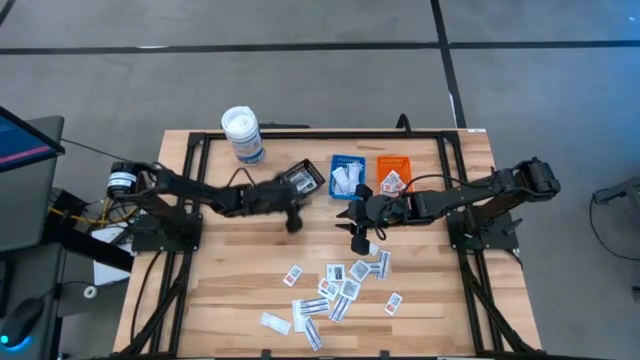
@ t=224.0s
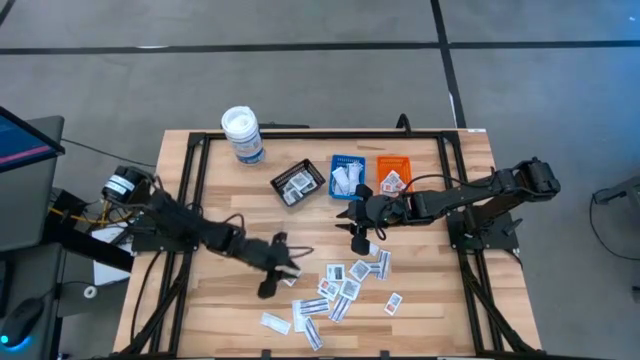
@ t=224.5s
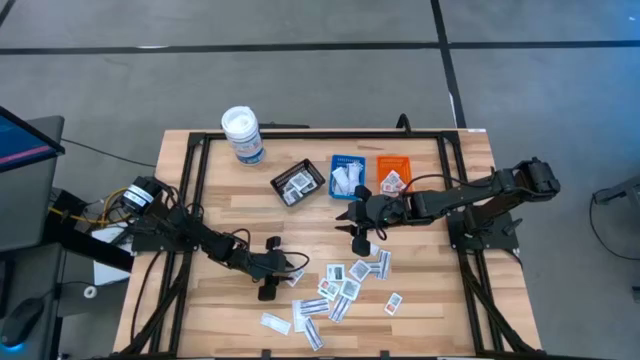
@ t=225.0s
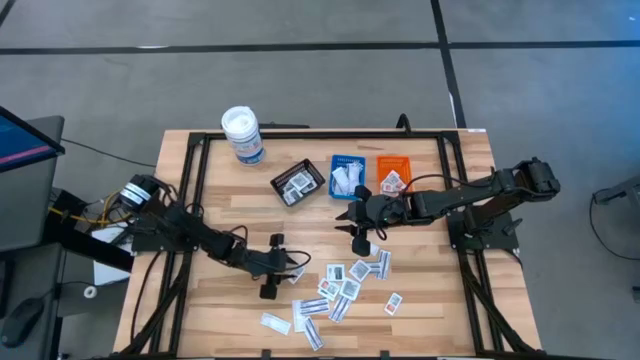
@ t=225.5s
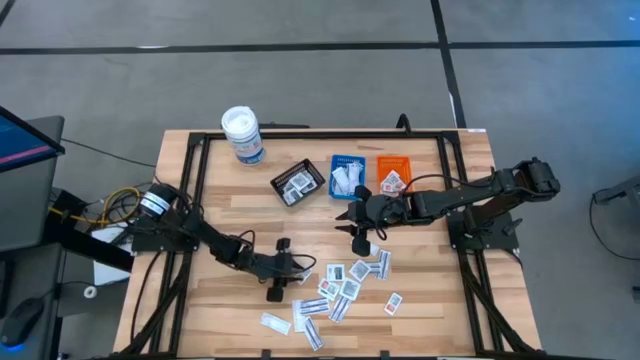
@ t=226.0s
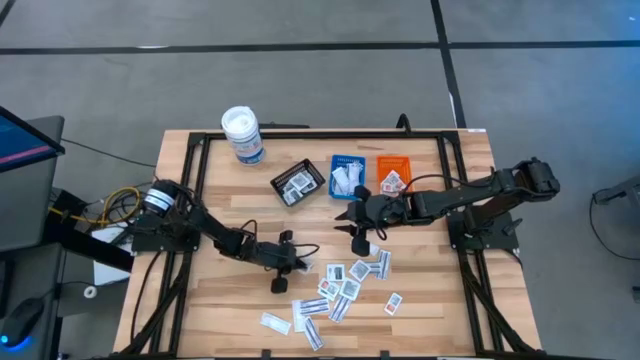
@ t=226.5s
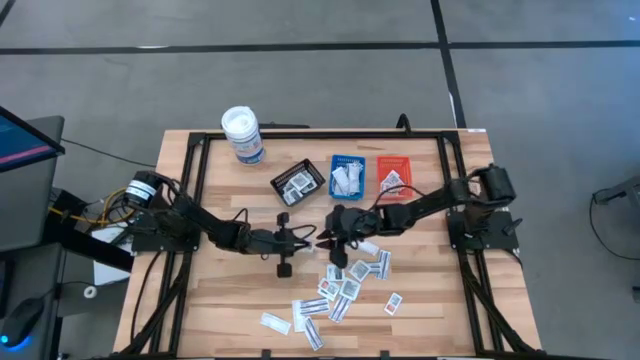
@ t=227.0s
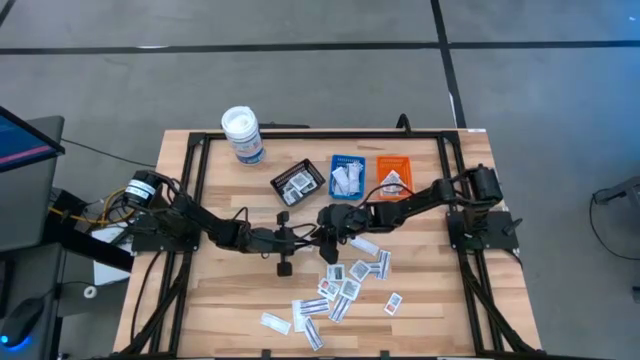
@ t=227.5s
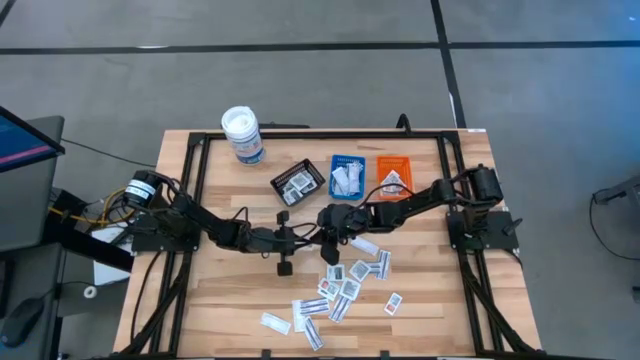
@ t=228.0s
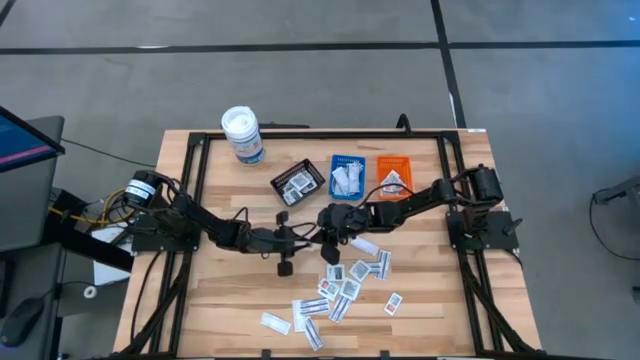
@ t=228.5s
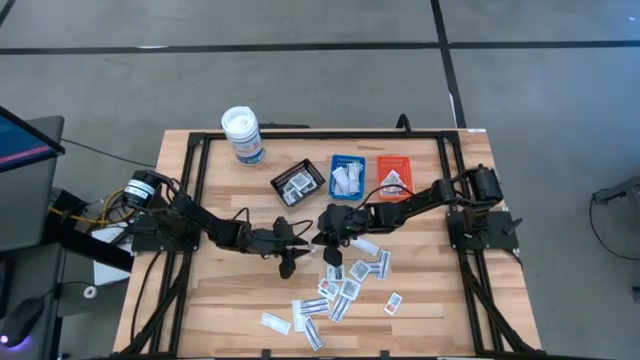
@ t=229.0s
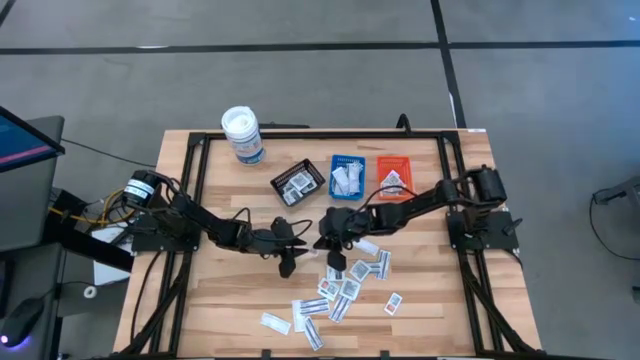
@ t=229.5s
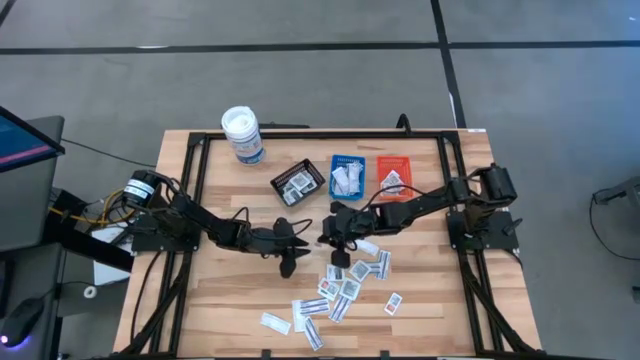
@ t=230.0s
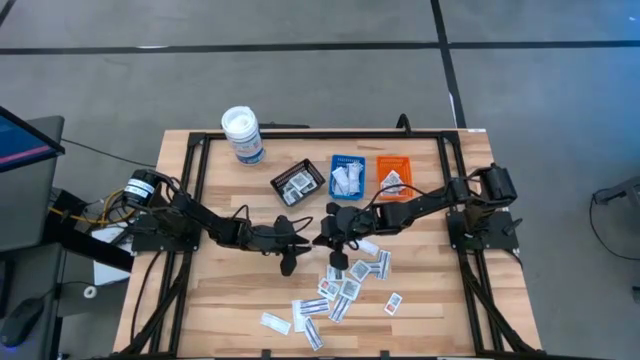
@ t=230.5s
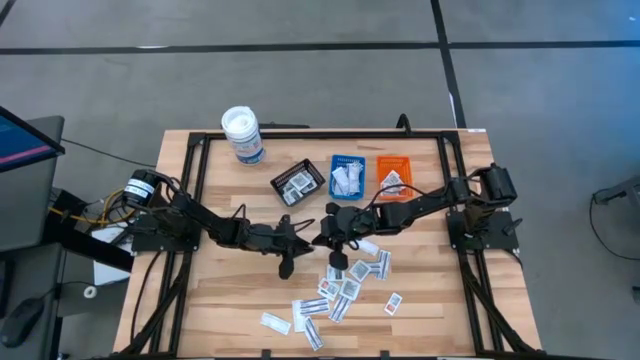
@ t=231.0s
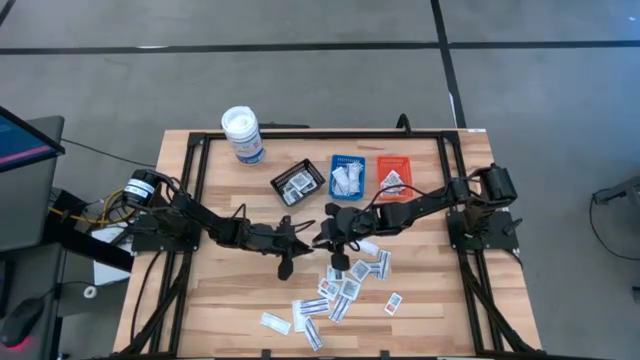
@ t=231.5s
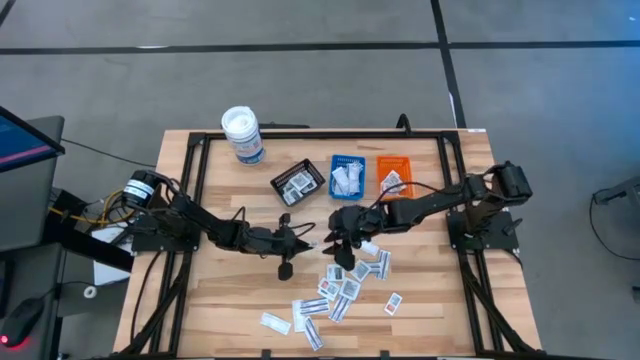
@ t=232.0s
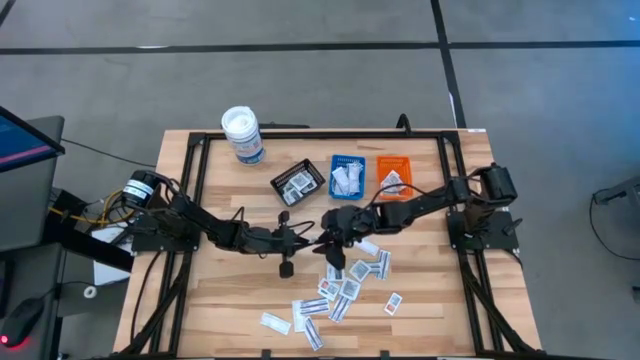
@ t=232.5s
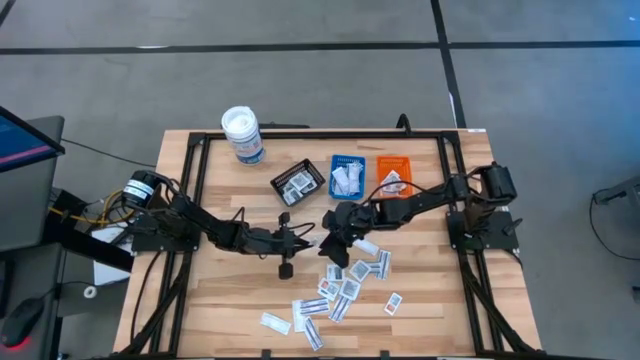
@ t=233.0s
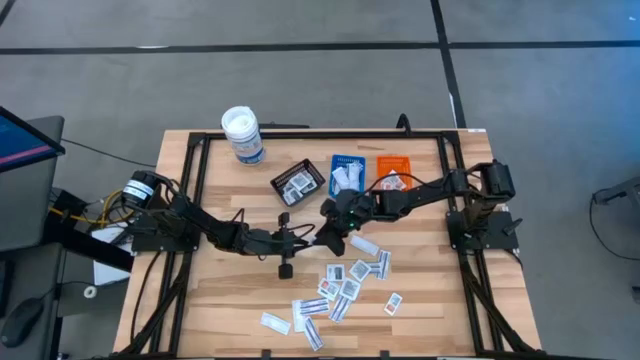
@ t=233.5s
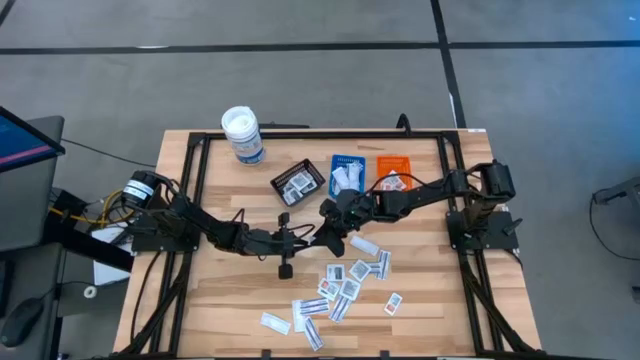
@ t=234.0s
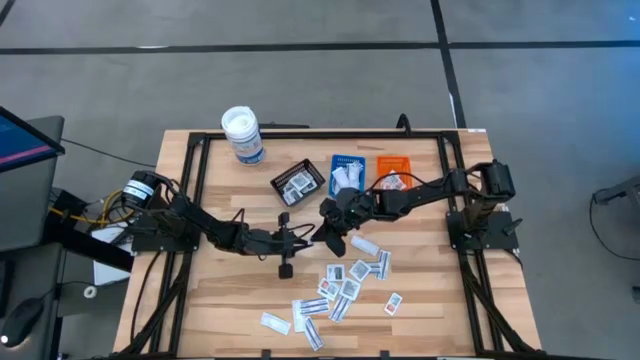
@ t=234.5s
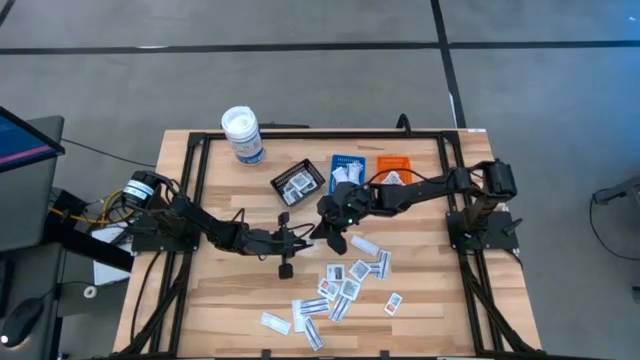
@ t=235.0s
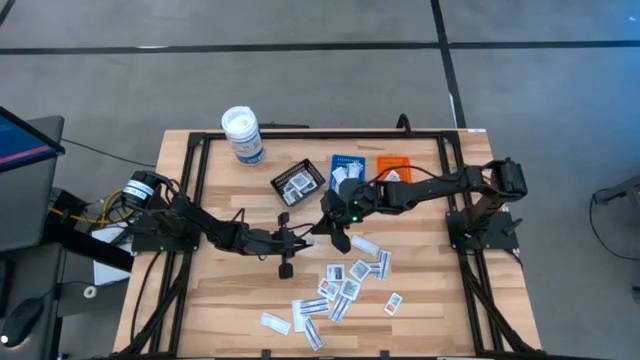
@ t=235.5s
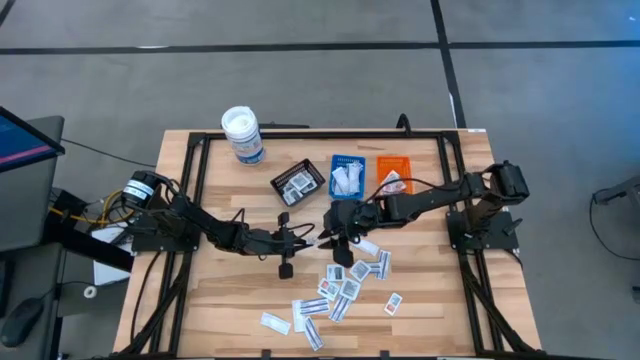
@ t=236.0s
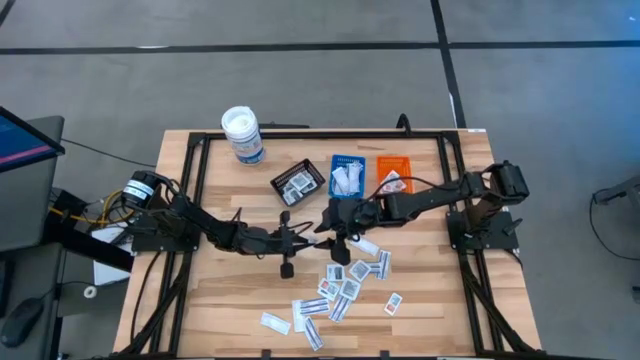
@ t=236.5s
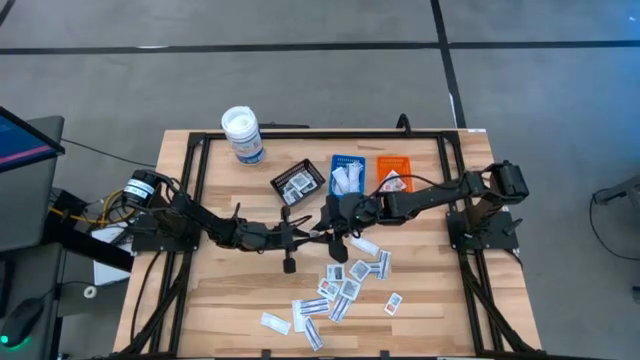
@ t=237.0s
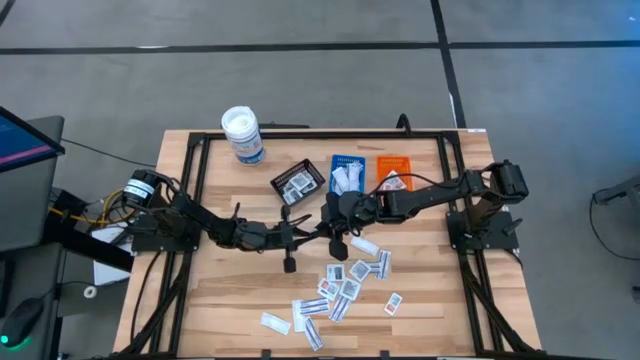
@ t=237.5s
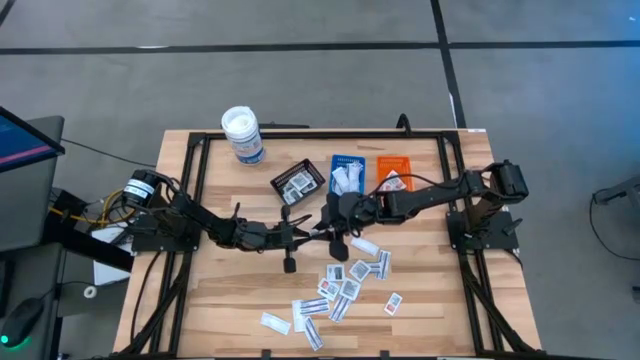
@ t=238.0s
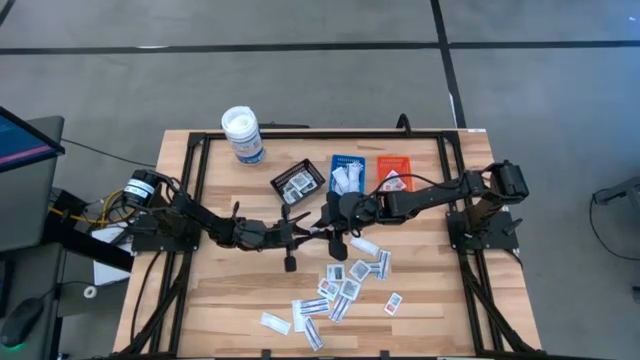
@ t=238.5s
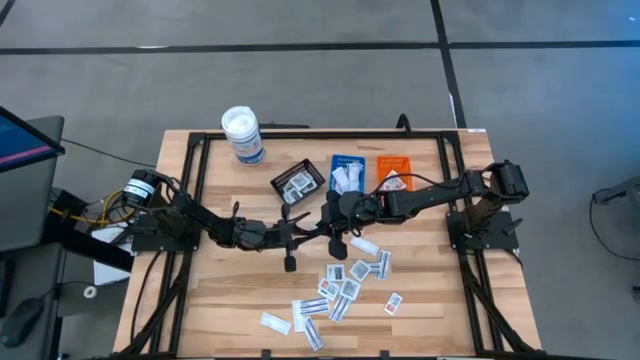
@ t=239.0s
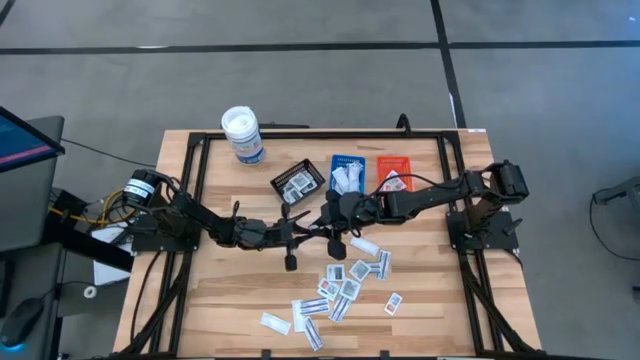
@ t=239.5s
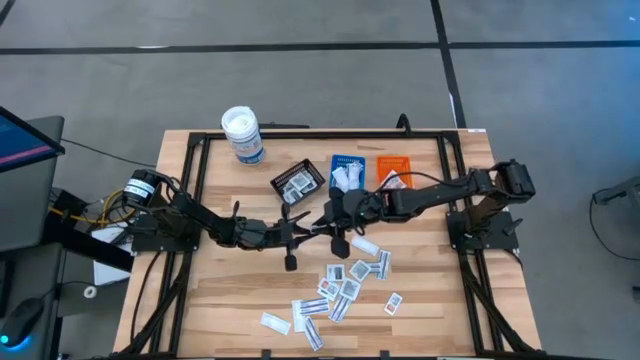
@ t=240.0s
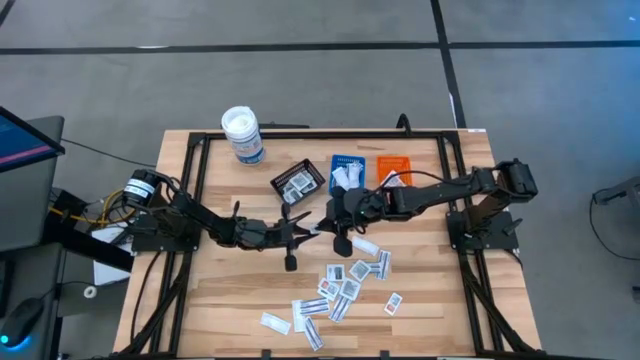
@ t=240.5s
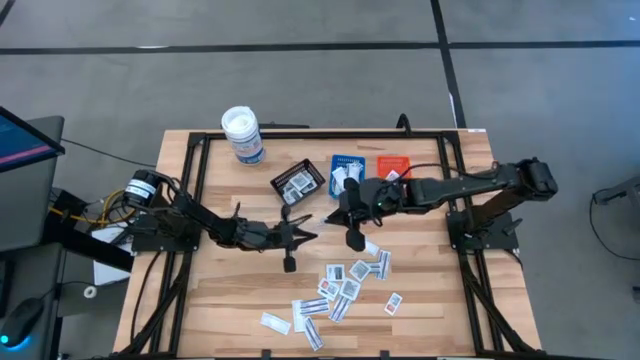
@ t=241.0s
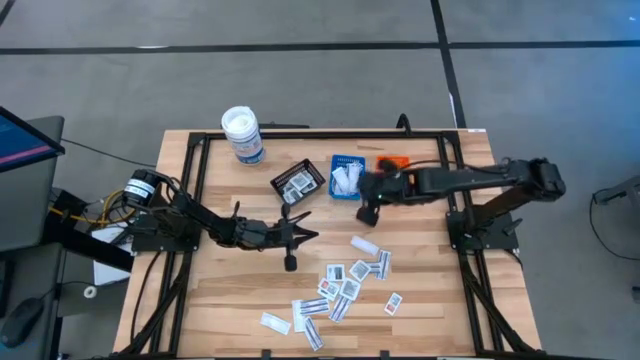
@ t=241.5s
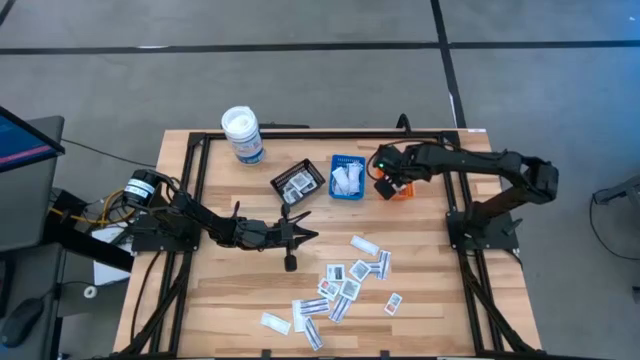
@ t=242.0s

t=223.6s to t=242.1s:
Task: Pick & Place First Aid Supplies
Put the orange ointment pack into the orange bin

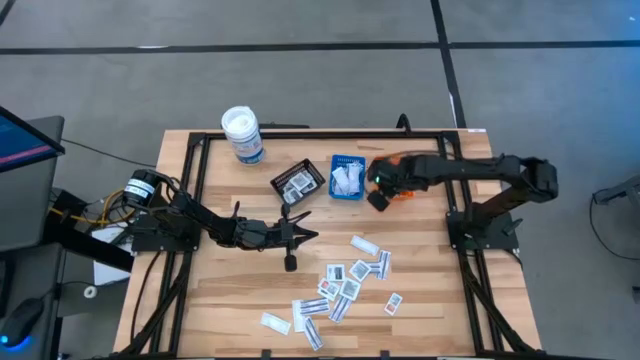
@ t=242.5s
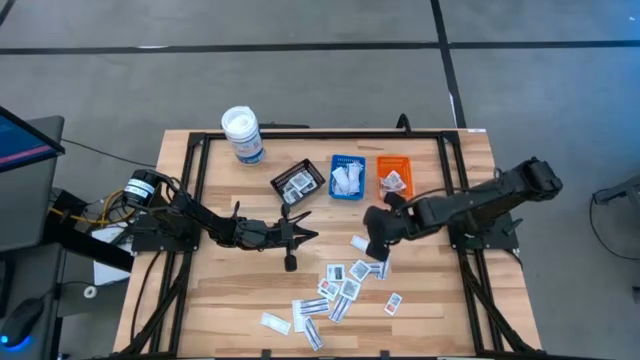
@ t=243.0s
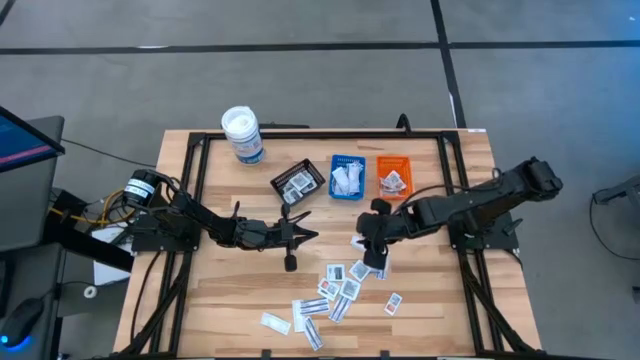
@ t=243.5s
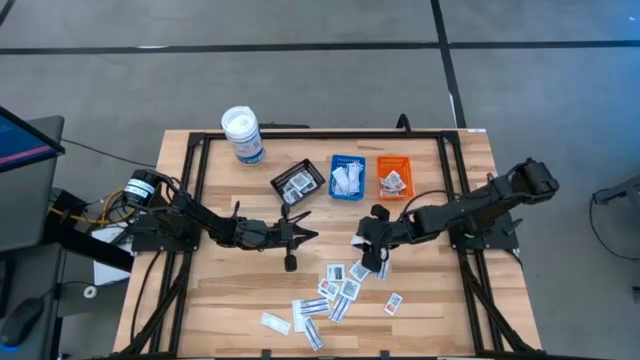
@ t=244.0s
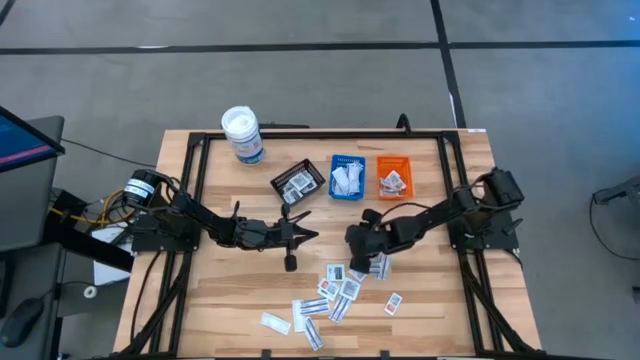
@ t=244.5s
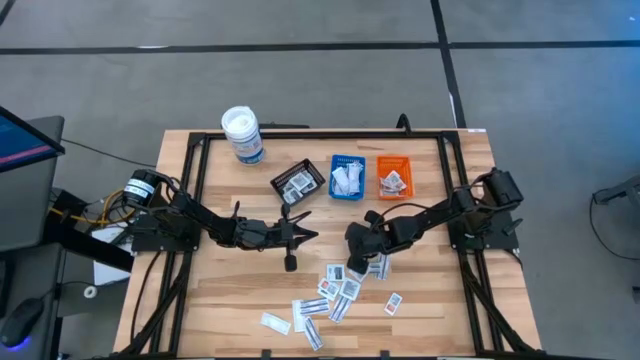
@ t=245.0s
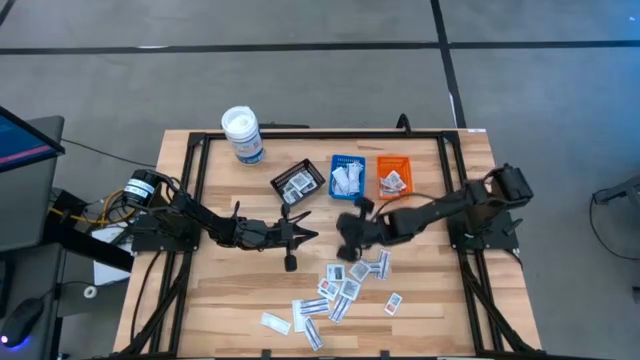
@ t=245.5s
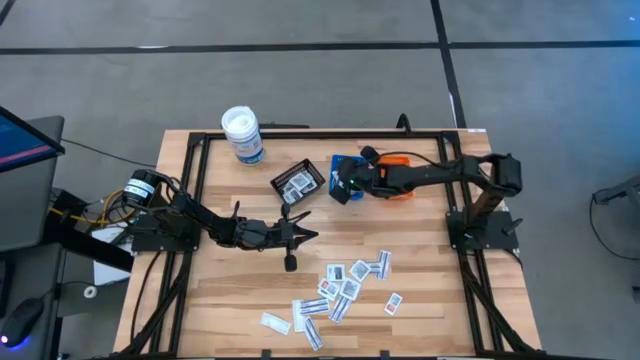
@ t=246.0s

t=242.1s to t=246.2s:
Put the blue bandage into the blue bin
